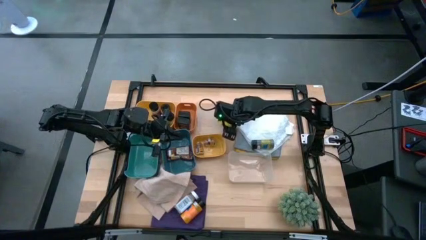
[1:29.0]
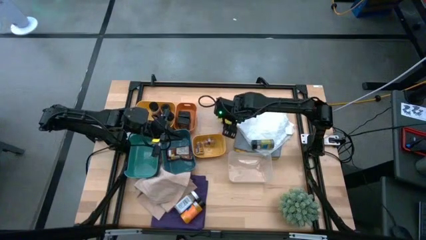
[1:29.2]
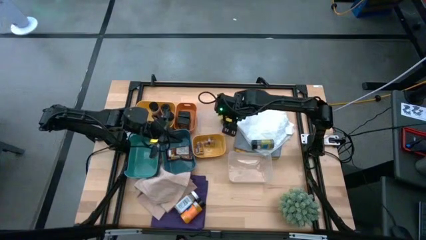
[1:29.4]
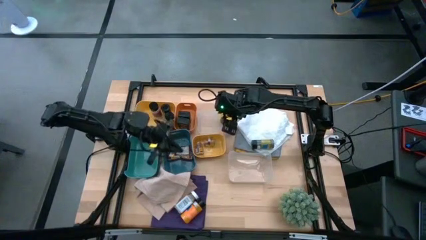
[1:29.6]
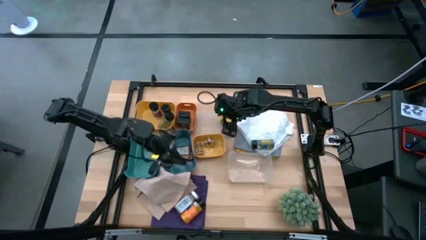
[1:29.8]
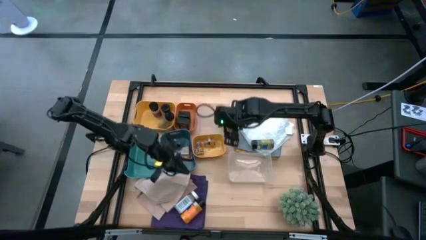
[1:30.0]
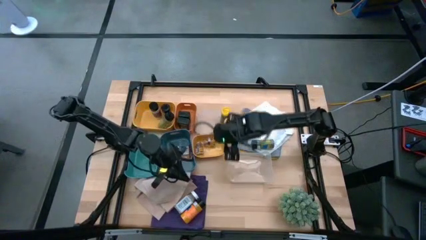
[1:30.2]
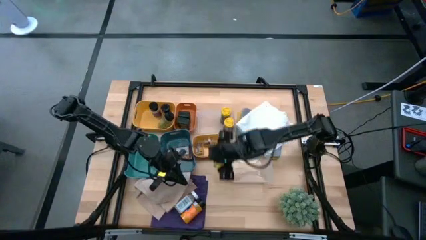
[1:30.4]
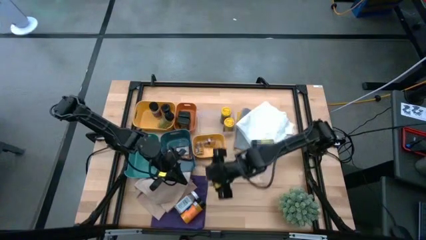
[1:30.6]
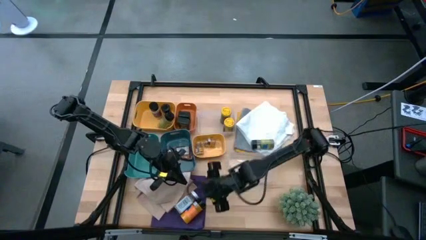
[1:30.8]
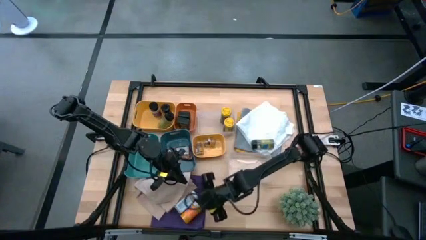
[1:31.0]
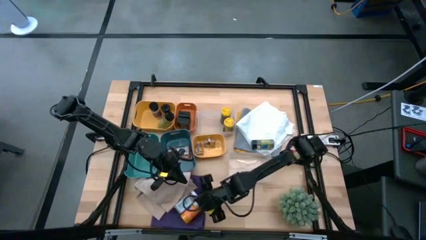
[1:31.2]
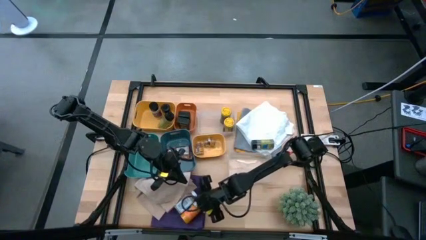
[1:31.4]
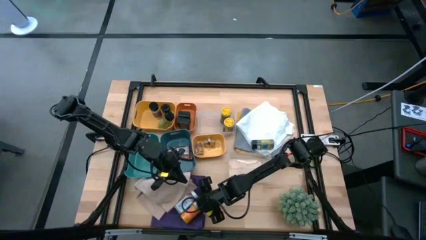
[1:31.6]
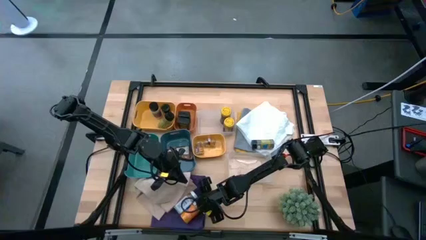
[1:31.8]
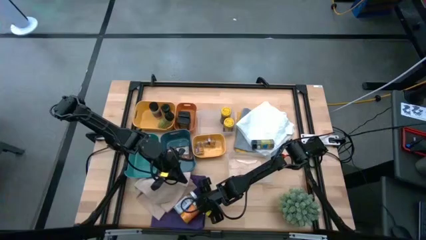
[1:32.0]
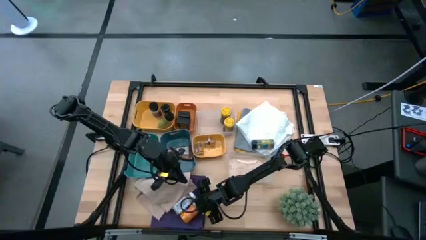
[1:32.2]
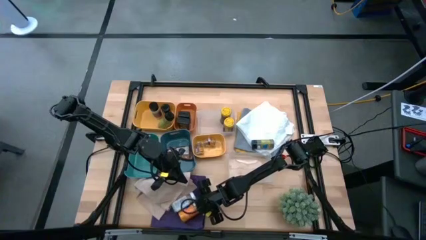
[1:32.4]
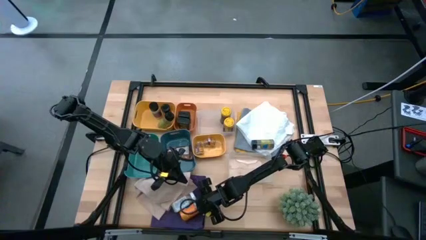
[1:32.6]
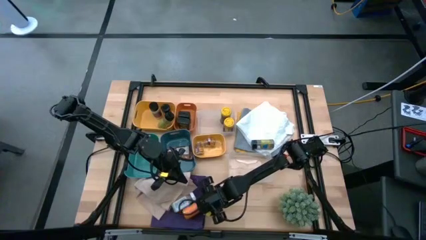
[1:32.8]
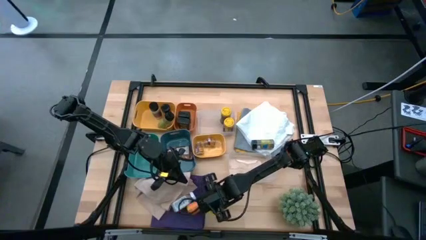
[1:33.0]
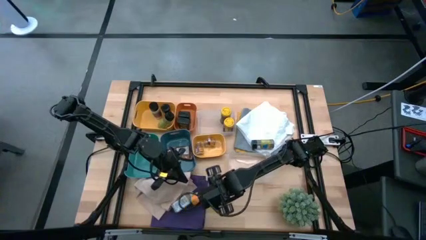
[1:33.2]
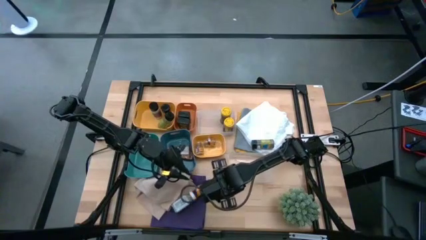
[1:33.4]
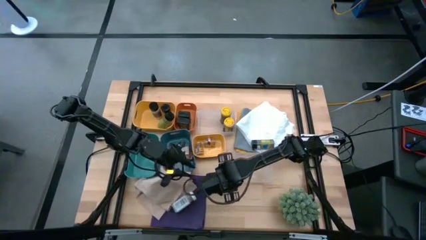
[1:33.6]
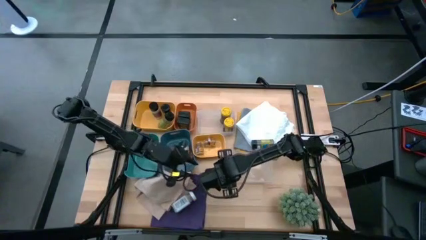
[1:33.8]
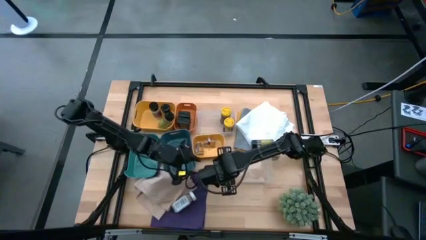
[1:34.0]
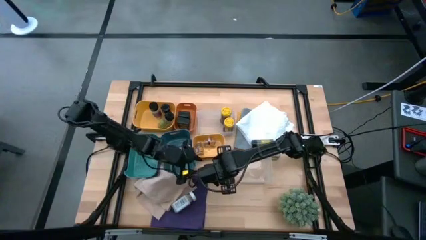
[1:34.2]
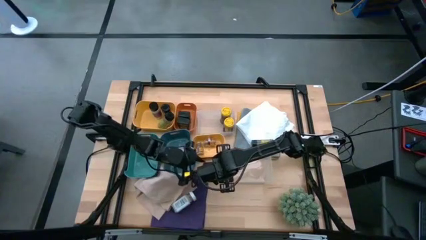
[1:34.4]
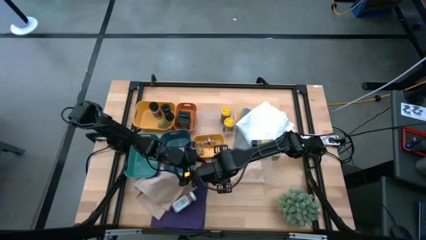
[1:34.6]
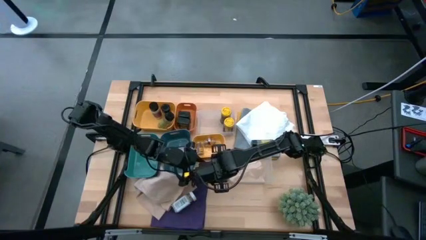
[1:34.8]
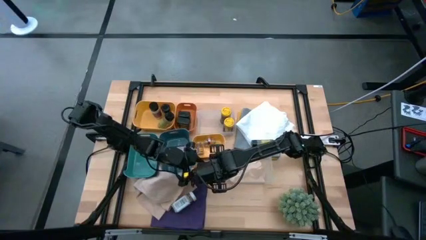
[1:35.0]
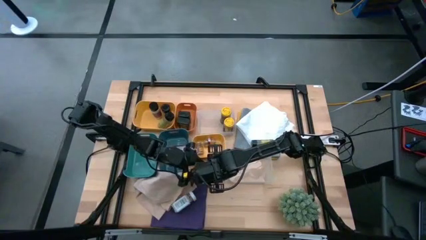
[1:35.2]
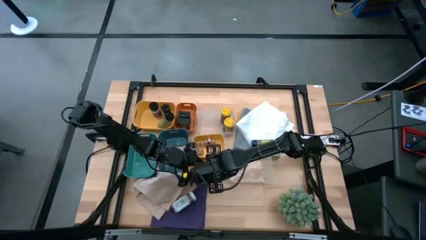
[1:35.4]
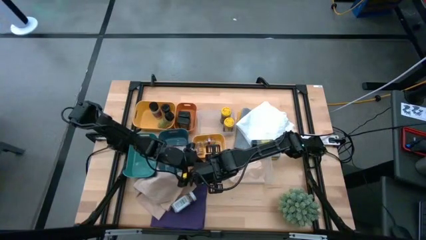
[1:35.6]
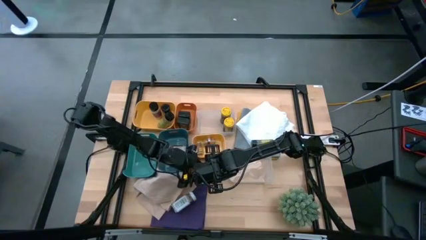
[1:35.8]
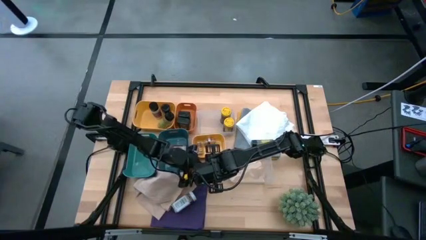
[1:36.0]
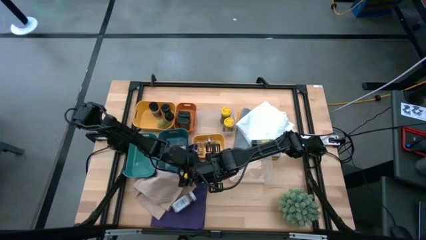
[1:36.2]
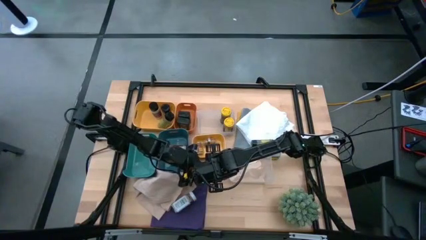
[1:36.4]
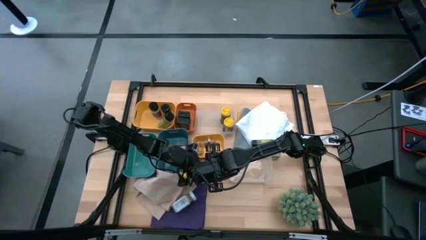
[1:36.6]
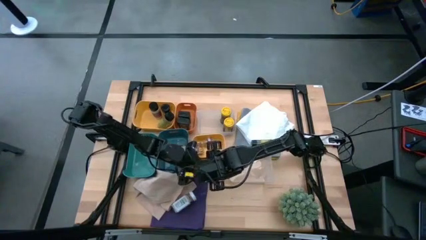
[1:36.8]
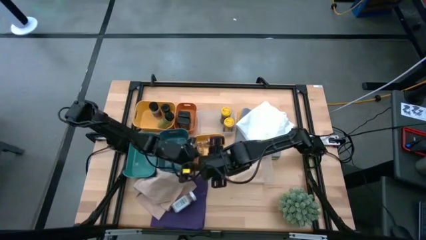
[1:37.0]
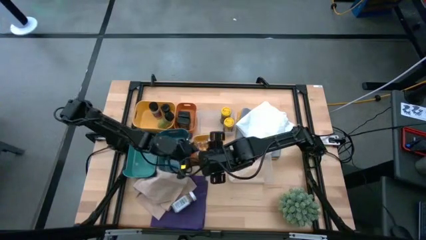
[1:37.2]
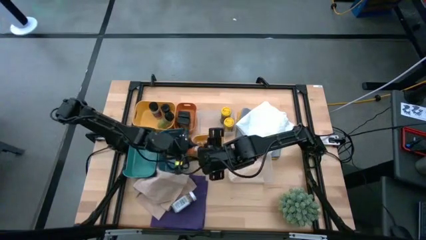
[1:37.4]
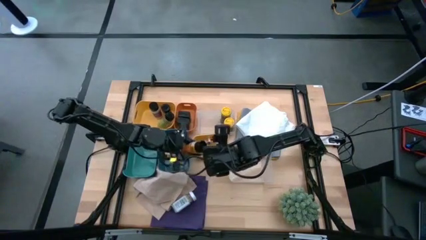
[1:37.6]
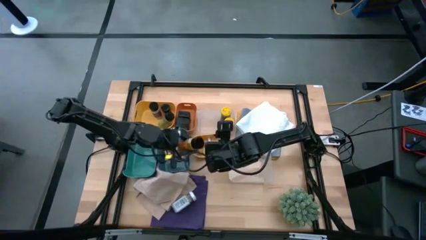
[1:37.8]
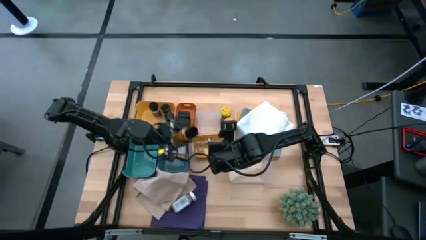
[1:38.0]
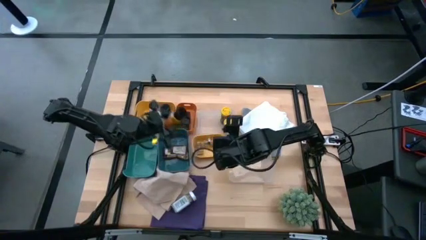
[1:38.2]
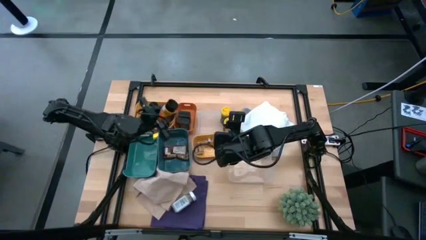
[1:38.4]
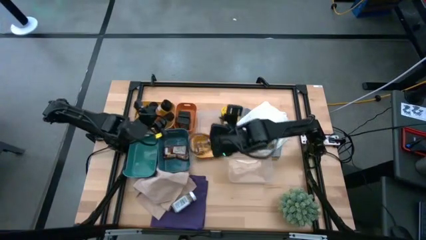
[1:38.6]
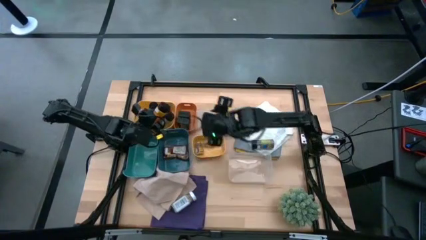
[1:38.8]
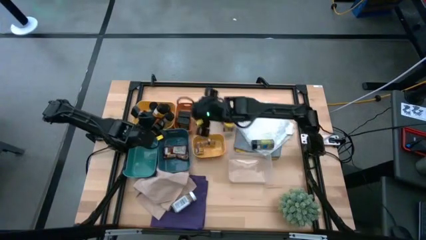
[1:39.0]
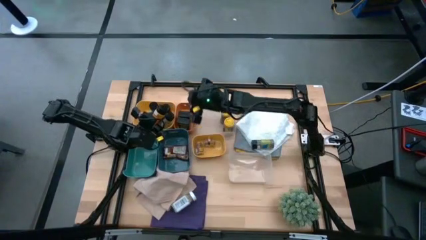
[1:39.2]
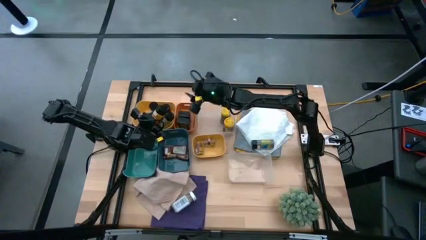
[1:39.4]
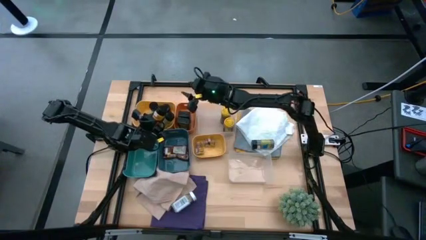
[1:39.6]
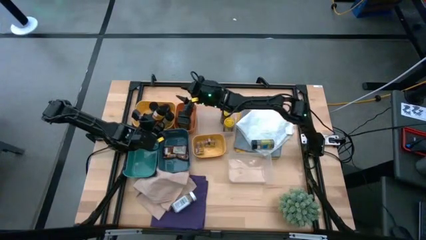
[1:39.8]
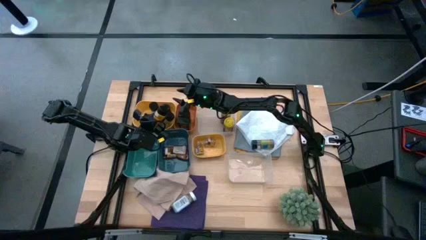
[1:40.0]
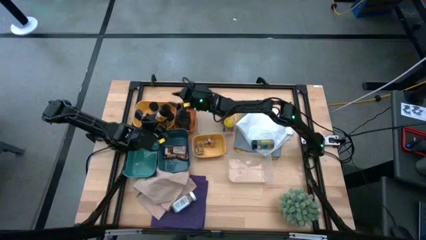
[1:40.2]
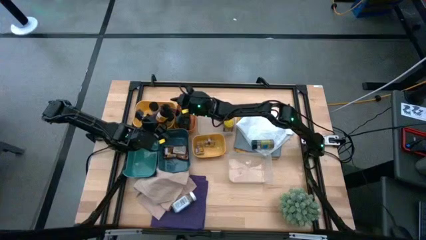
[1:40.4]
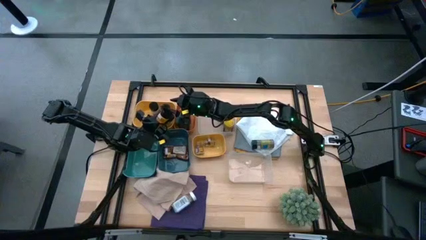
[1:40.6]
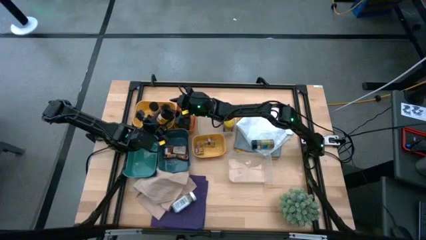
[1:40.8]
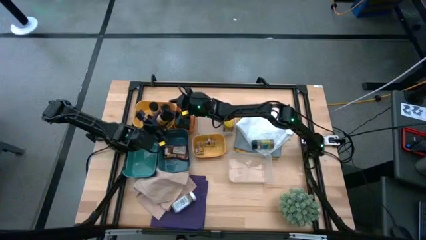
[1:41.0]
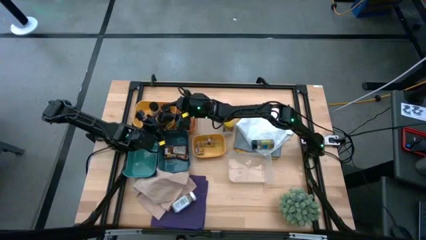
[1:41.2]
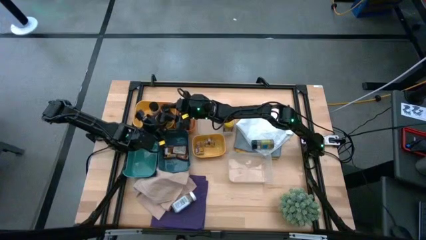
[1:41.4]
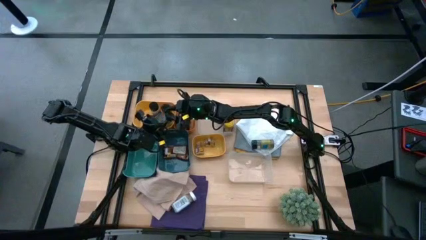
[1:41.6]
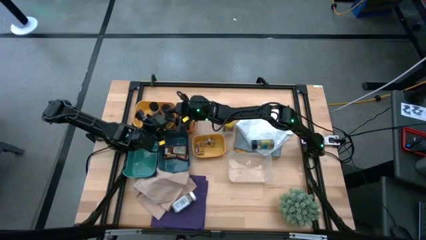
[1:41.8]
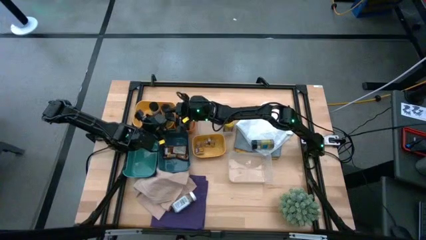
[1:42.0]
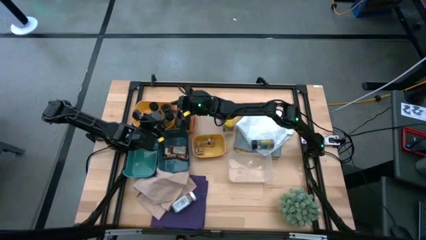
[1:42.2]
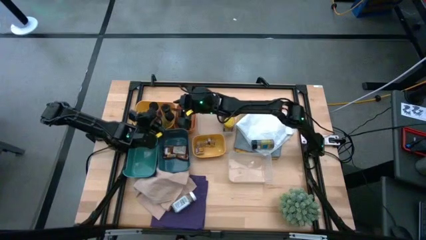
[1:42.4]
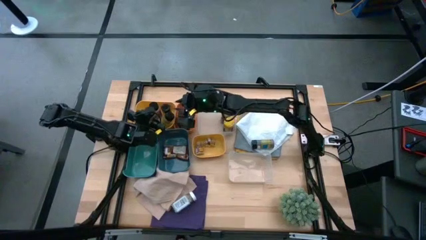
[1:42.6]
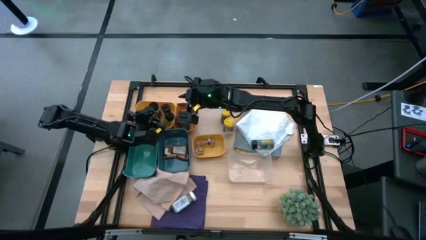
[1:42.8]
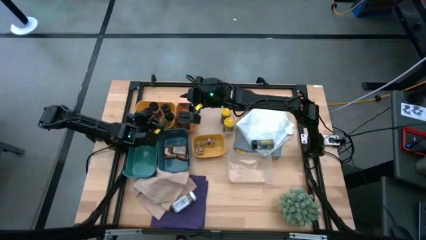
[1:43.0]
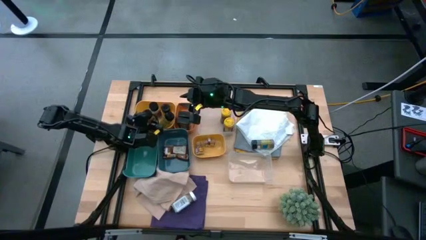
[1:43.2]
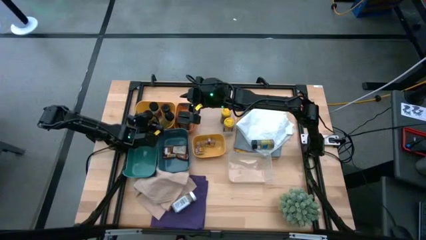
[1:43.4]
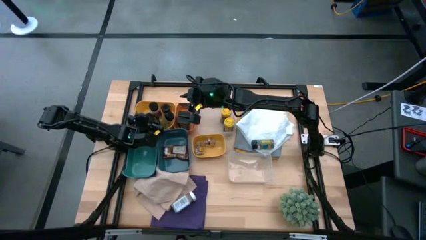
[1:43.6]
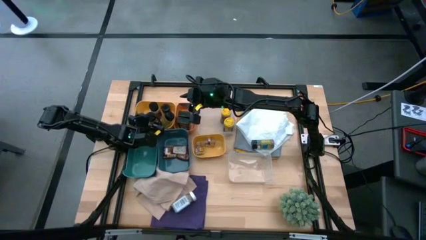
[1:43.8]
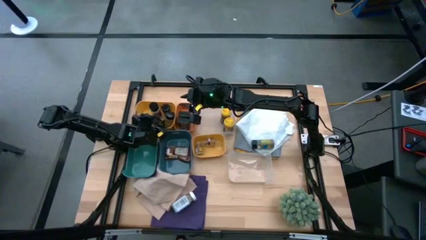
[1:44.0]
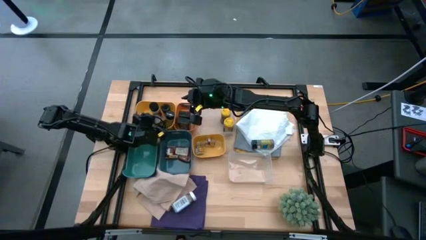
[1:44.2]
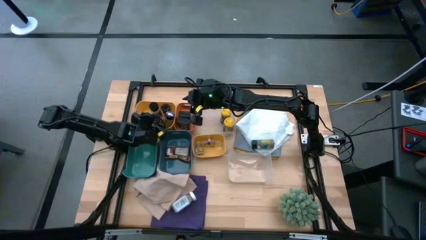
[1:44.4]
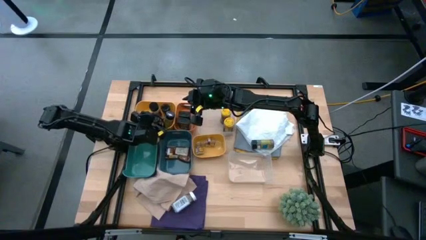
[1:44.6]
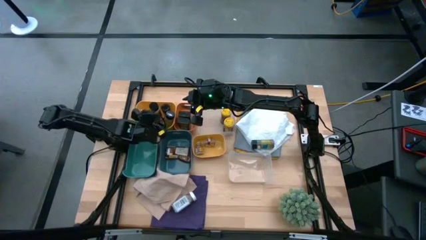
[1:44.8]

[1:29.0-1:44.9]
Task: Sort spices by type
Put the orange spice bottle into the top yellow bin
